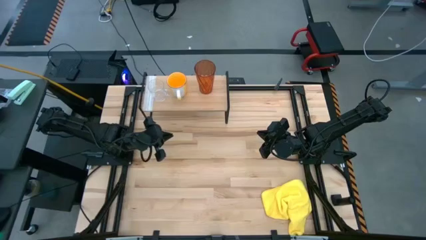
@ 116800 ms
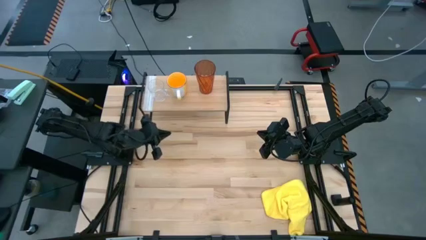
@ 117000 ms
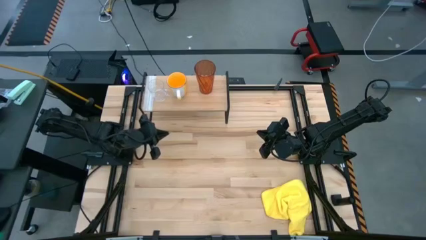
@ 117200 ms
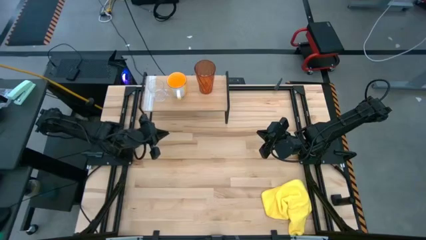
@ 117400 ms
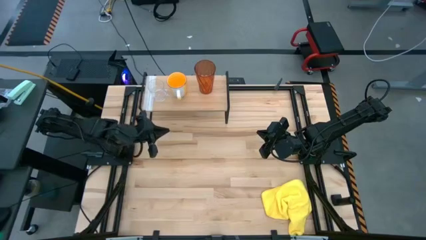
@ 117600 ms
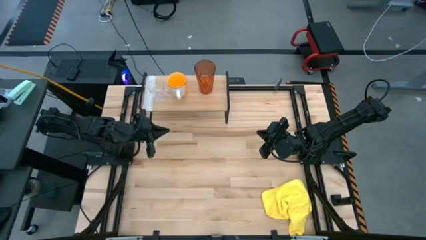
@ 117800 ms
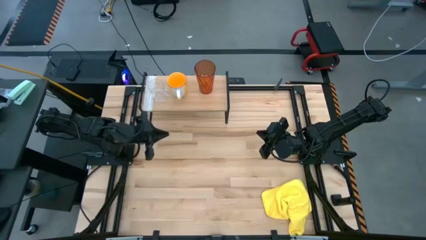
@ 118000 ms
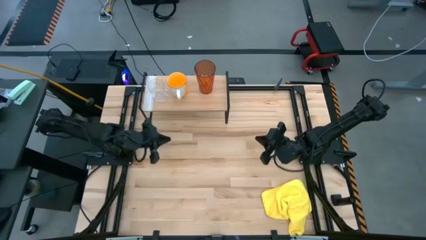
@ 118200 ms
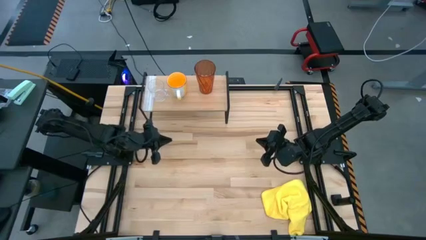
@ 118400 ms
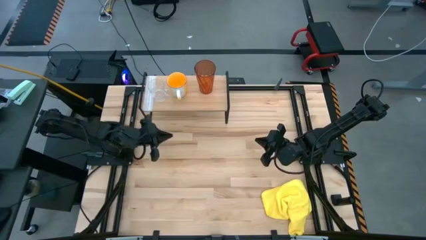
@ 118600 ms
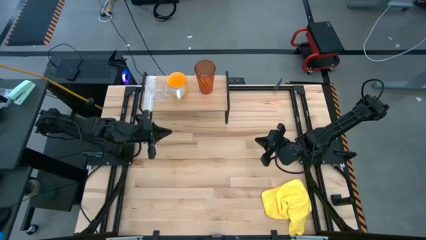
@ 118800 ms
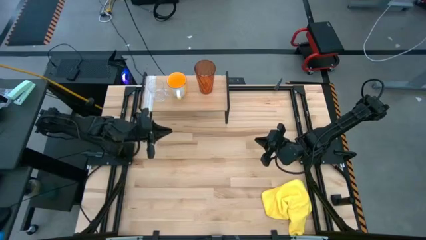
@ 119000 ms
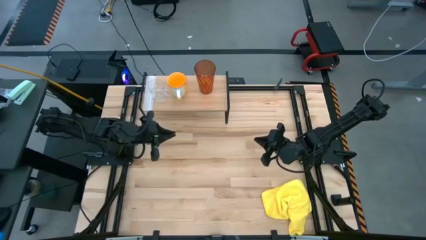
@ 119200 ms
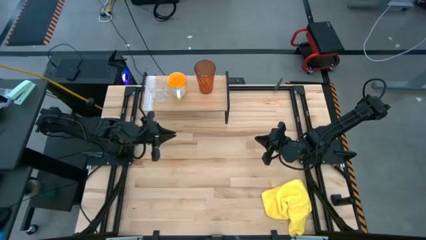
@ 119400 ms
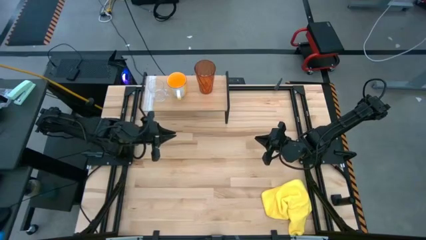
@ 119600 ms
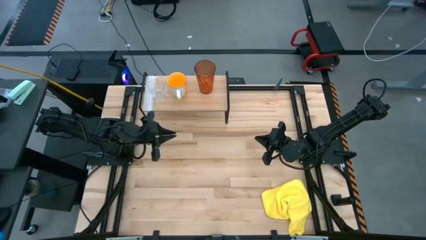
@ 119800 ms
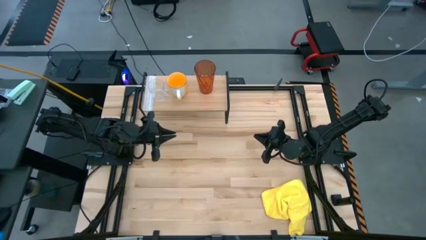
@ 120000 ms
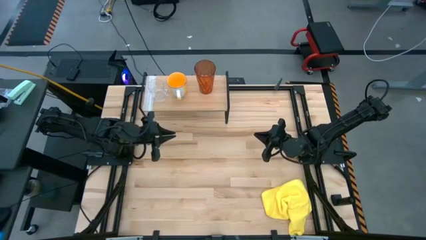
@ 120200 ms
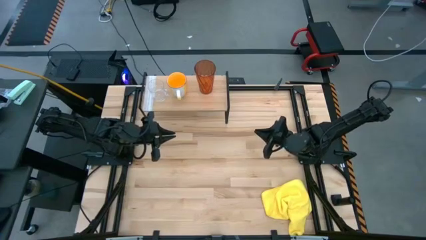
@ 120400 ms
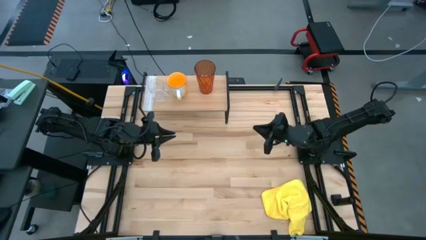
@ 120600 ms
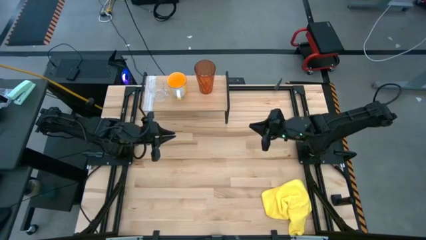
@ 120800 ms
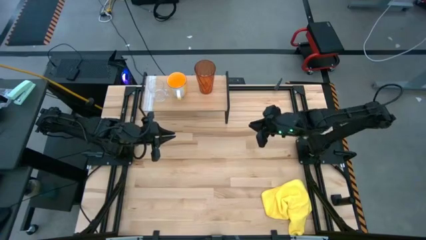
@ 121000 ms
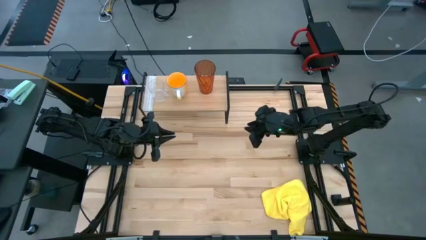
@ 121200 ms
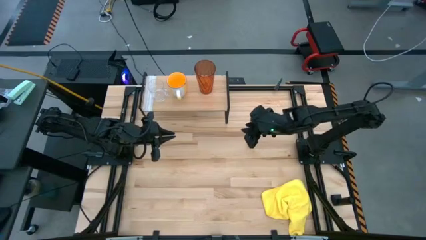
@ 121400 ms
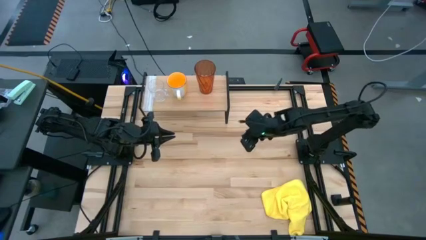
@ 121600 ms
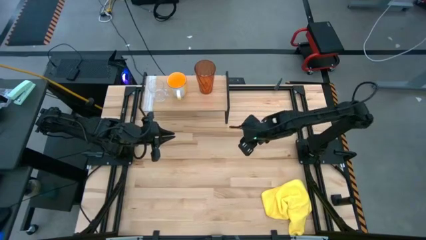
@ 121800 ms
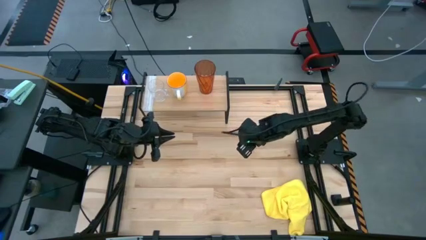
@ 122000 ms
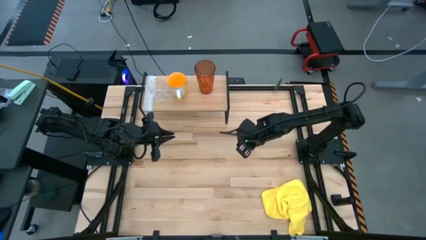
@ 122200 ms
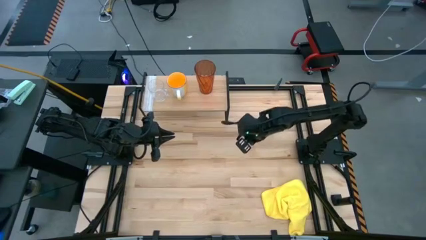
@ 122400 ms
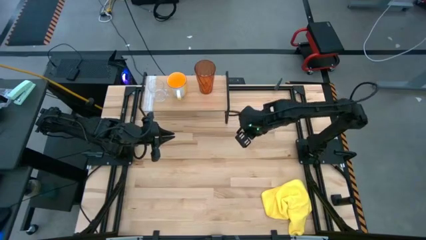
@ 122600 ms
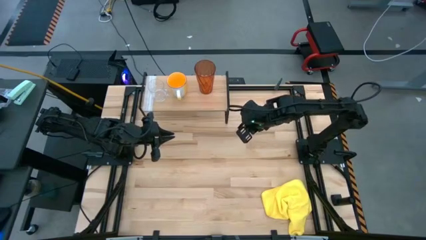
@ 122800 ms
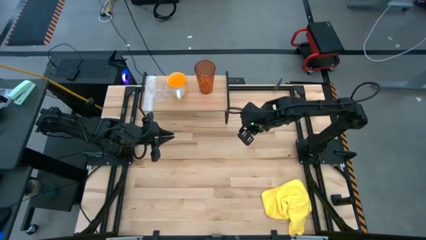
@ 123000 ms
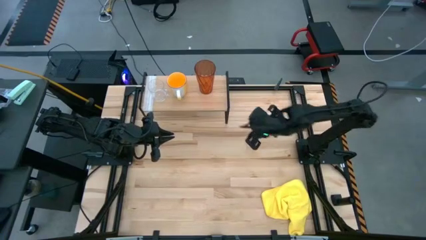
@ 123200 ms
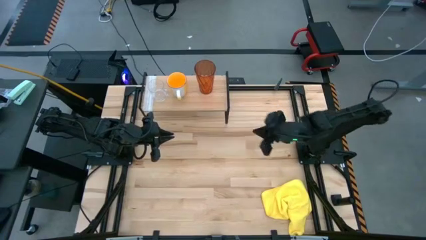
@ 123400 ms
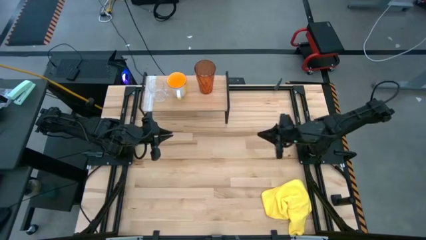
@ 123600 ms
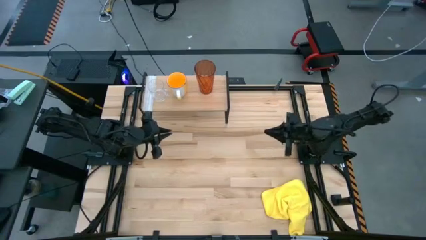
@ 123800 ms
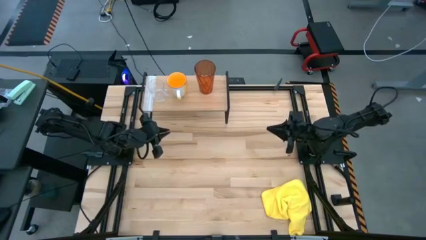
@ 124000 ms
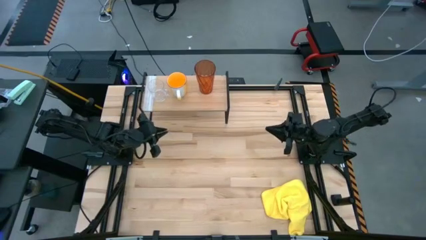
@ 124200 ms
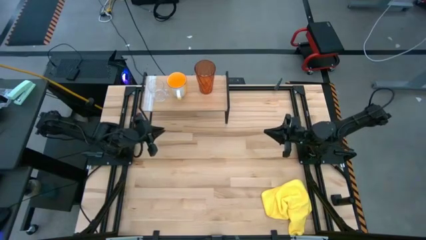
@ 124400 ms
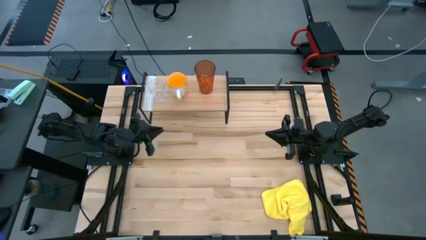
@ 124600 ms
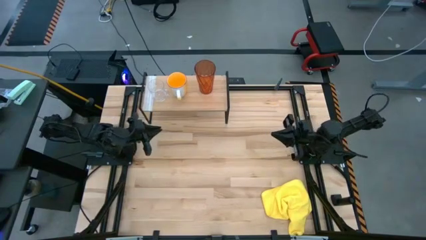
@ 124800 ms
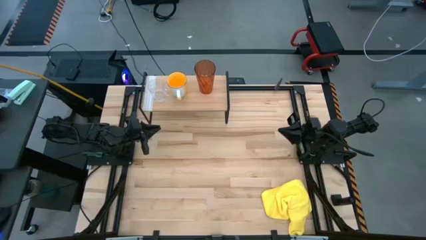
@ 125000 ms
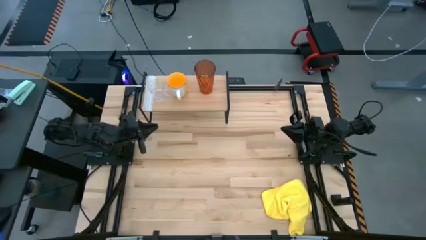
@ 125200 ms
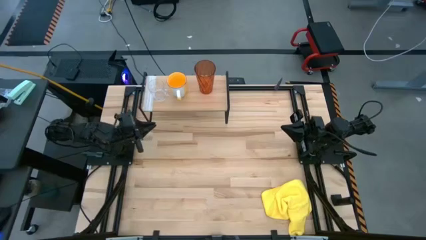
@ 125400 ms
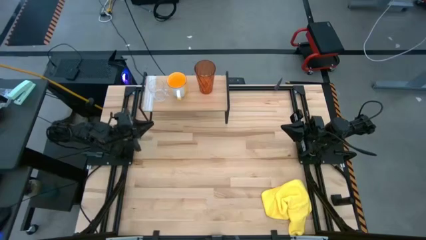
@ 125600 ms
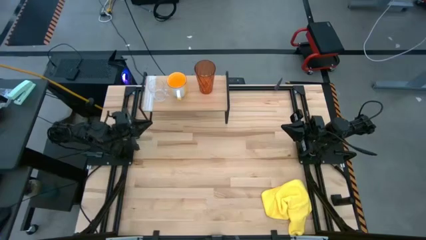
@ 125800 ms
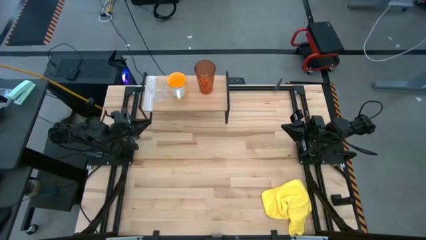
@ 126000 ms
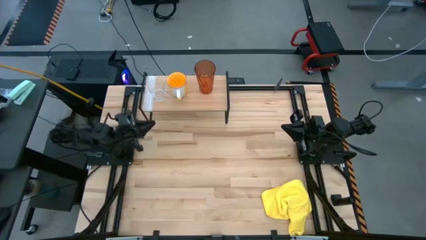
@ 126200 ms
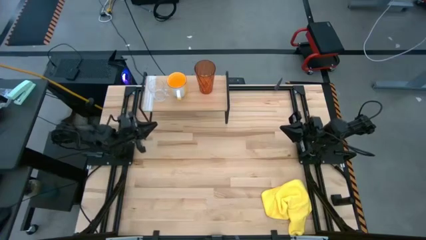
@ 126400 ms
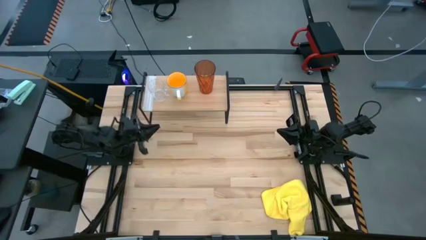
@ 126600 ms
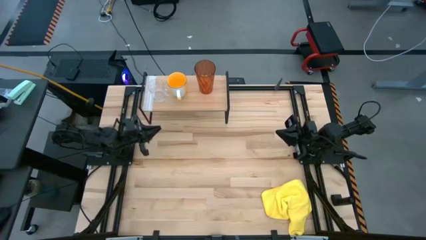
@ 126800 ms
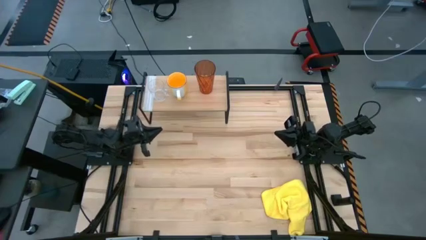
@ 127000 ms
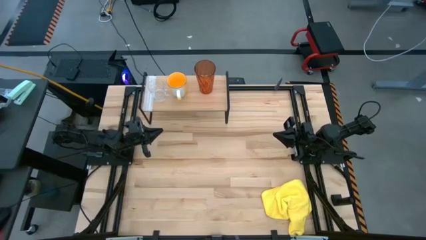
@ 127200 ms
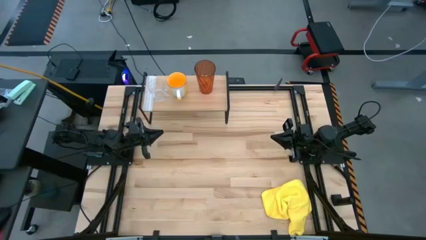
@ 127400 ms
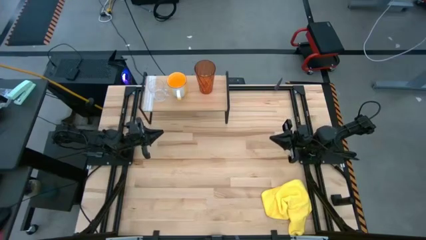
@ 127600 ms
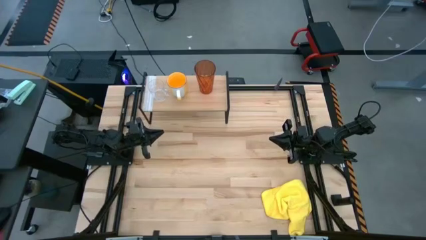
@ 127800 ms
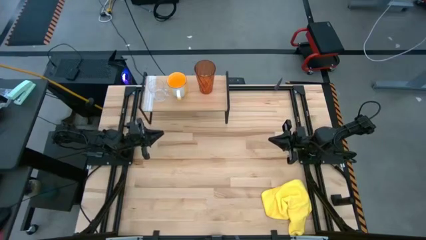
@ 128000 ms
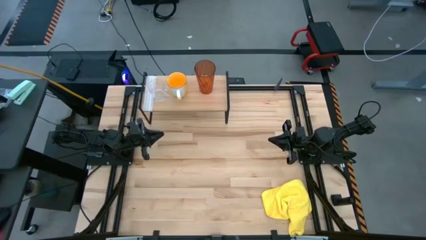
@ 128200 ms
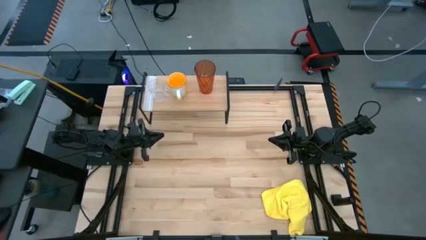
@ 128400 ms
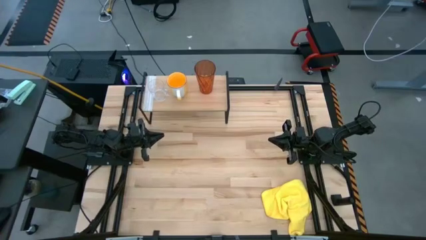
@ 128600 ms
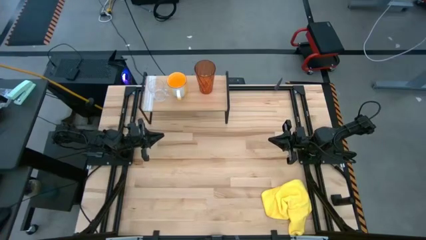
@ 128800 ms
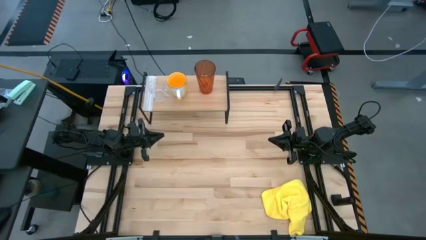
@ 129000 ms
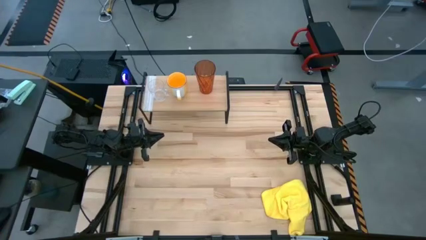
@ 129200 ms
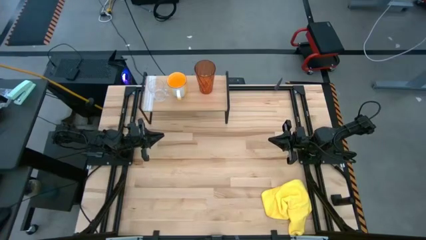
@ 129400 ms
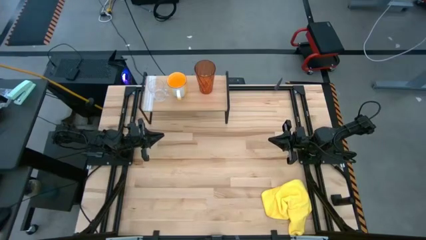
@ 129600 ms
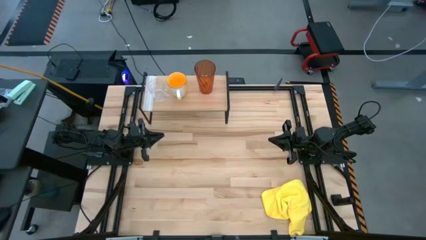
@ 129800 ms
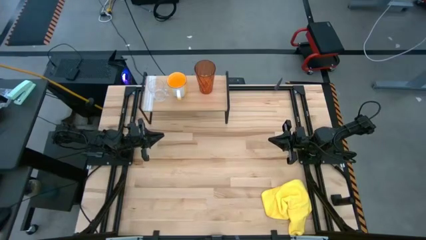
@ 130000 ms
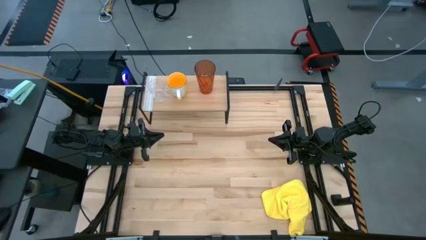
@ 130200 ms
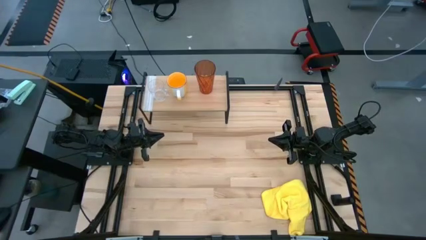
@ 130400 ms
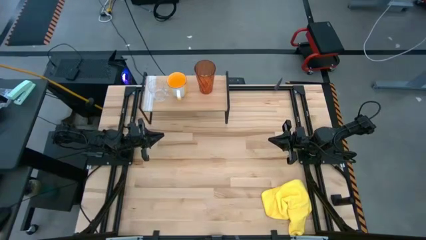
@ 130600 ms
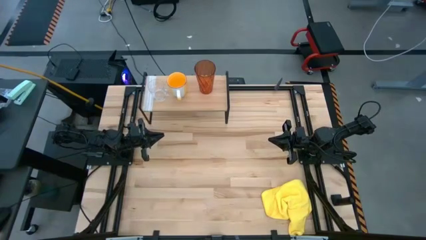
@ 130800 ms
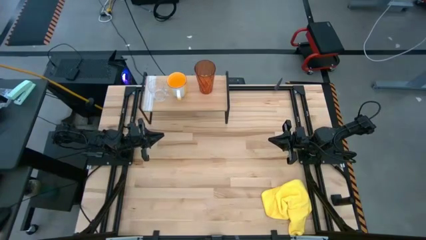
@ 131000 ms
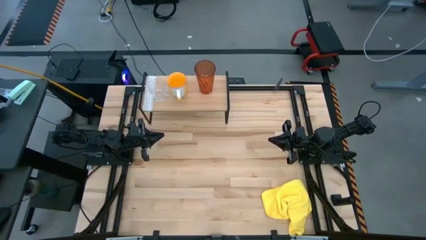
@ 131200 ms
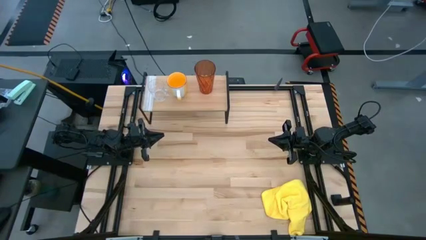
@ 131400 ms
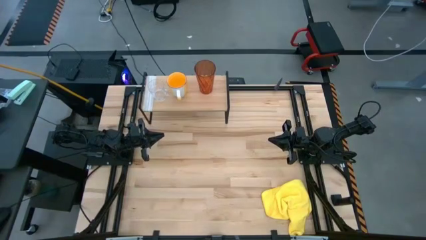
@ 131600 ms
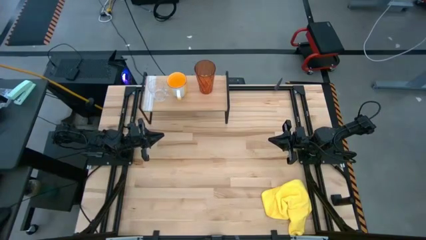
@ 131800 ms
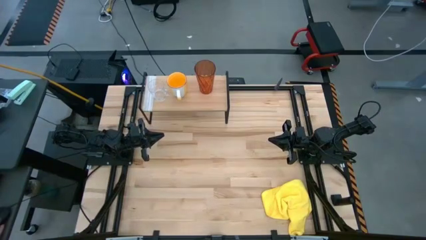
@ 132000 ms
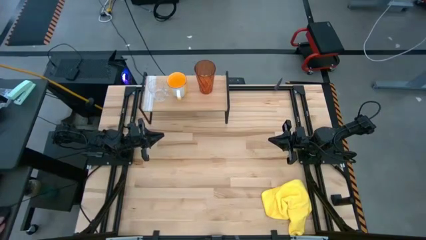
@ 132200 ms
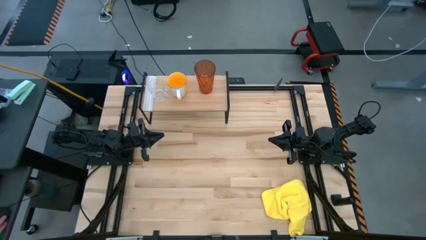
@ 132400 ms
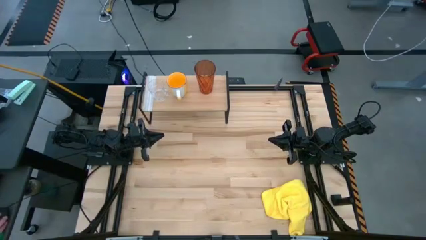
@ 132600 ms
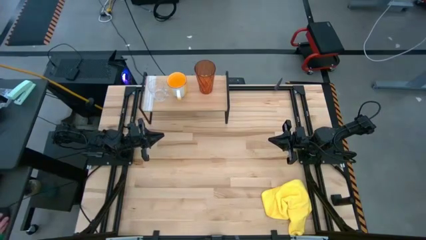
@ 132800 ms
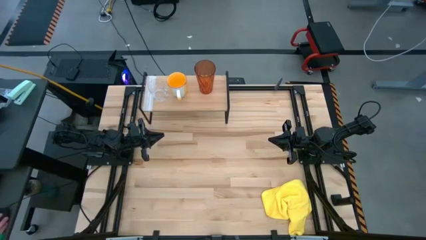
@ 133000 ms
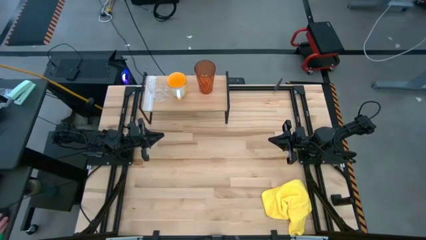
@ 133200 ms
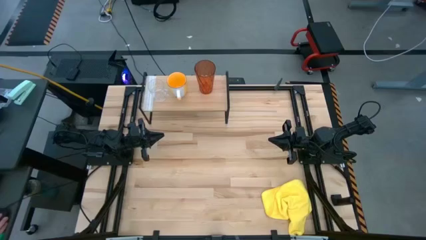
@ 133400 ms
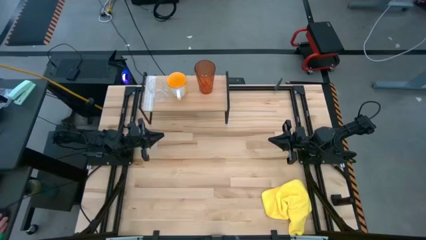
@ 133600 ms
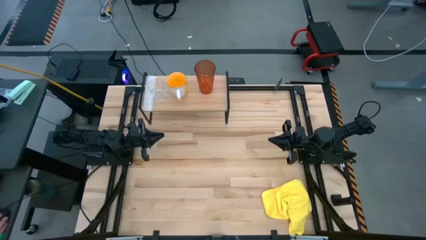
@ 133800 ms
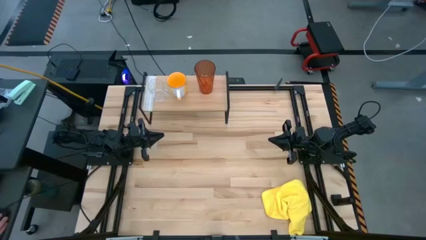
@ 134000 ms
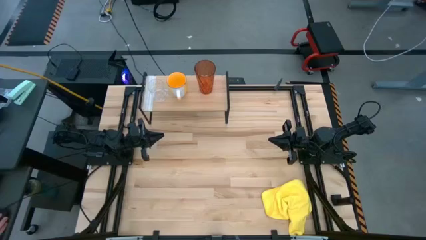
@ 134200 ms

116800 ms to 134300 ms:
Task: Stack small to large cups/mugs on shelf
Return to Home Position
